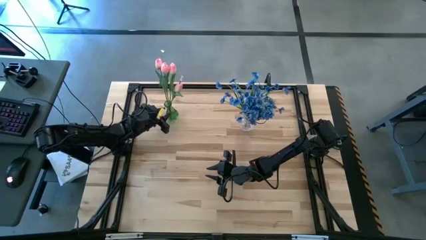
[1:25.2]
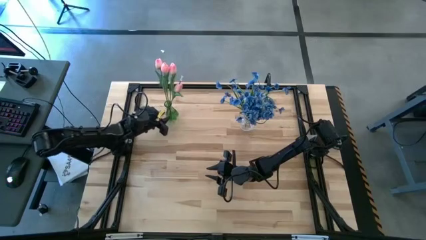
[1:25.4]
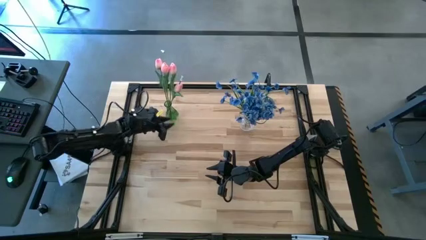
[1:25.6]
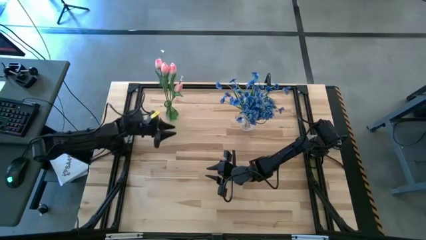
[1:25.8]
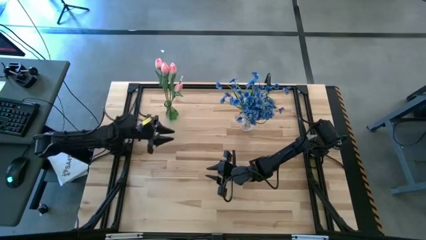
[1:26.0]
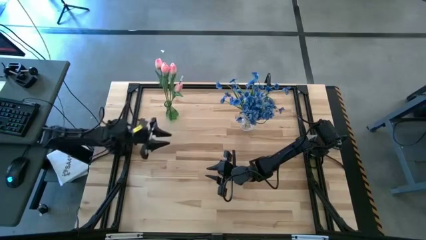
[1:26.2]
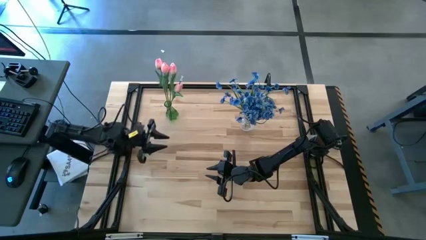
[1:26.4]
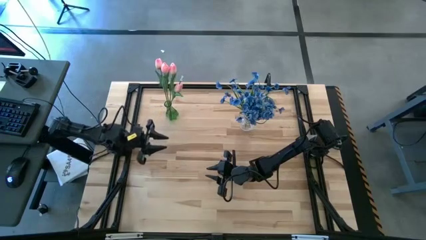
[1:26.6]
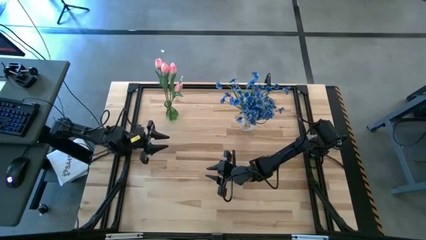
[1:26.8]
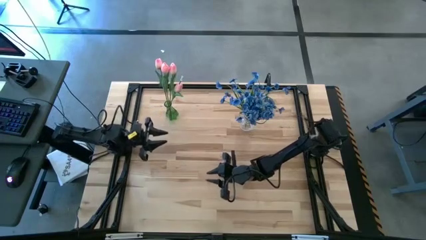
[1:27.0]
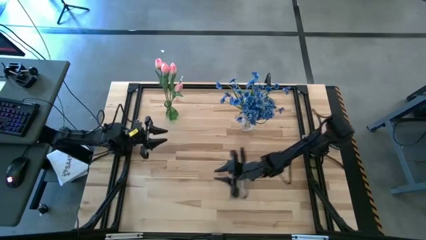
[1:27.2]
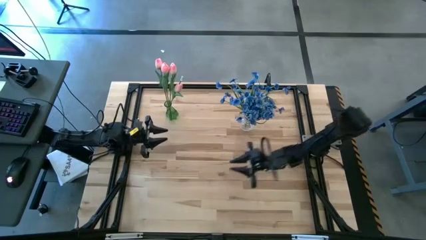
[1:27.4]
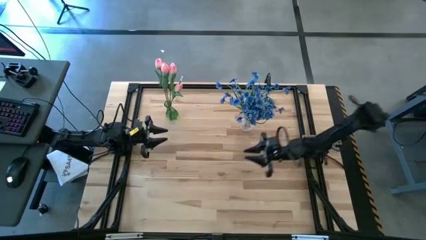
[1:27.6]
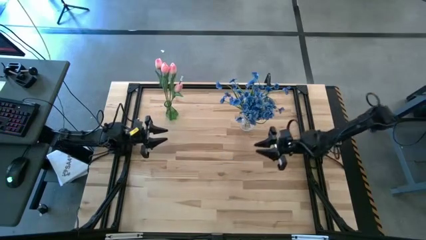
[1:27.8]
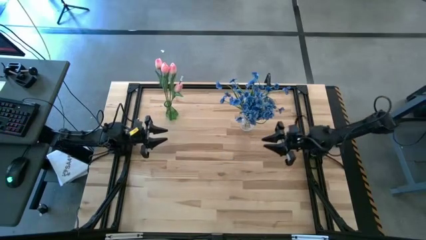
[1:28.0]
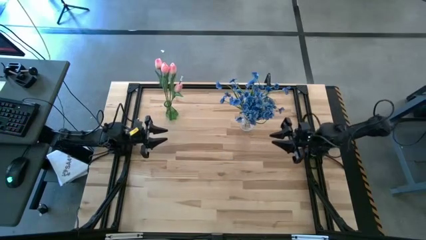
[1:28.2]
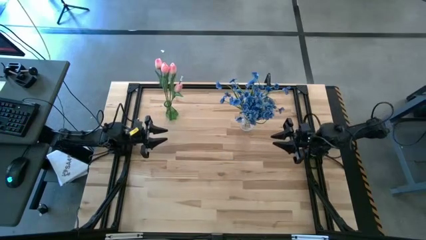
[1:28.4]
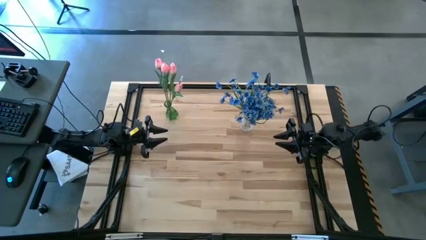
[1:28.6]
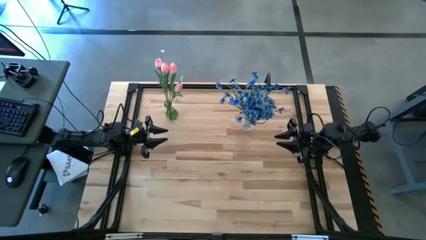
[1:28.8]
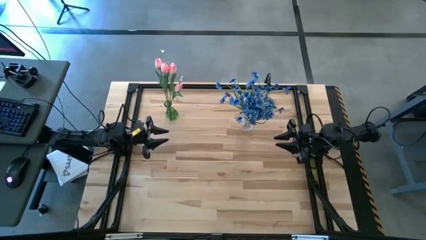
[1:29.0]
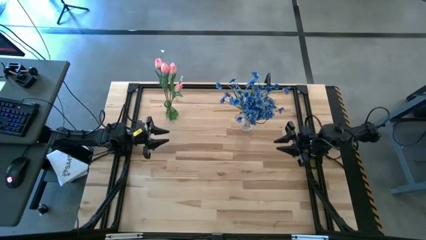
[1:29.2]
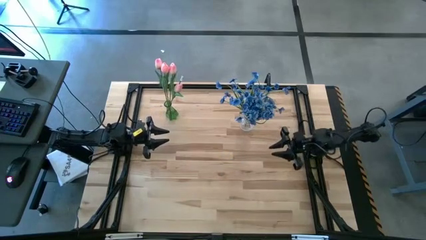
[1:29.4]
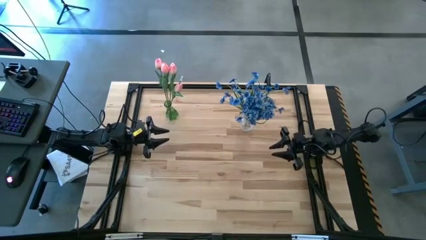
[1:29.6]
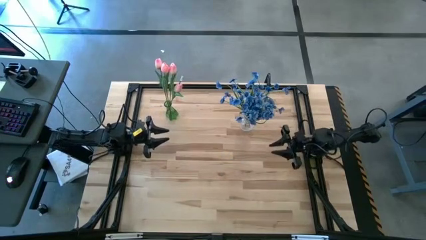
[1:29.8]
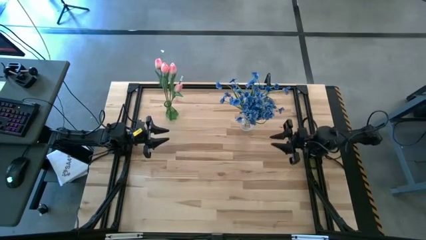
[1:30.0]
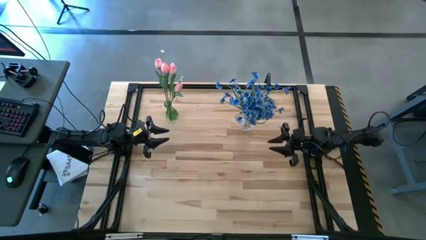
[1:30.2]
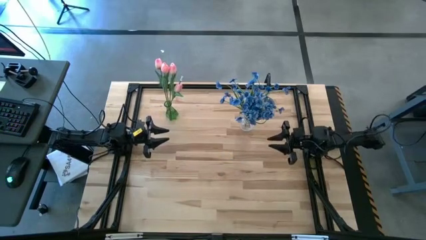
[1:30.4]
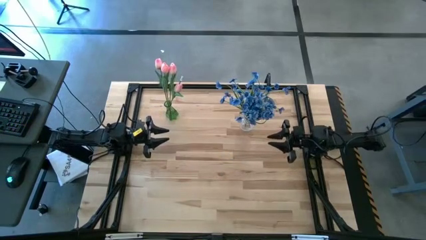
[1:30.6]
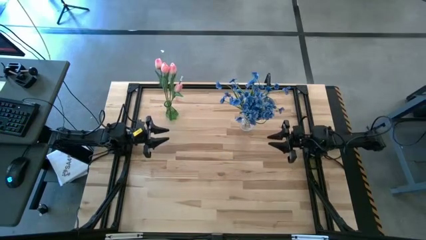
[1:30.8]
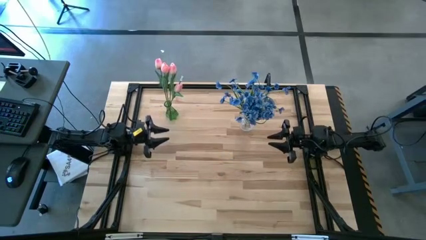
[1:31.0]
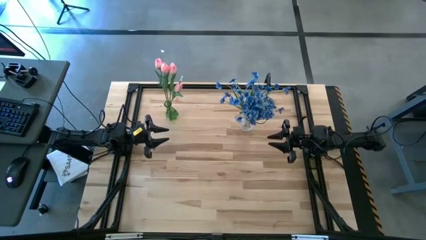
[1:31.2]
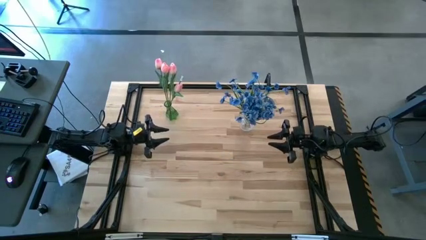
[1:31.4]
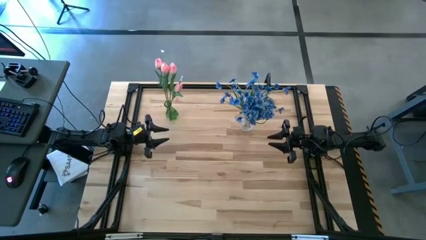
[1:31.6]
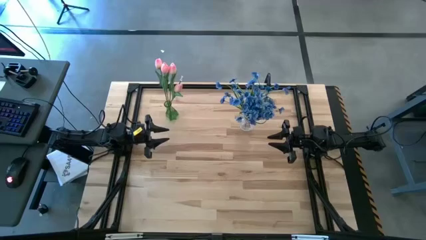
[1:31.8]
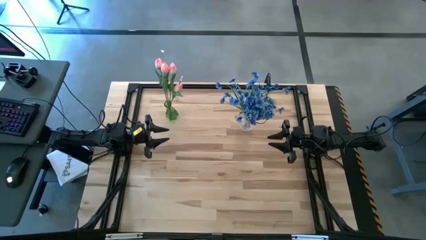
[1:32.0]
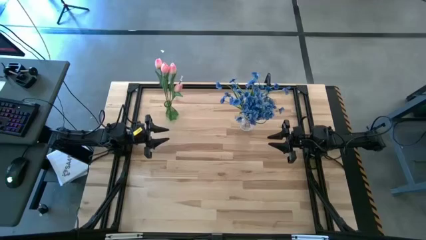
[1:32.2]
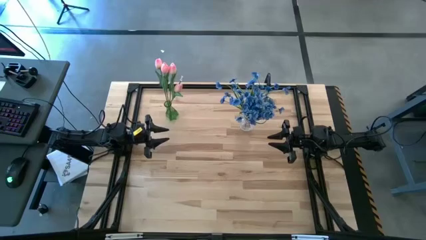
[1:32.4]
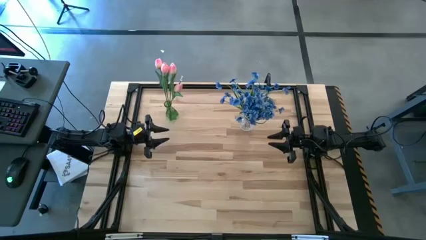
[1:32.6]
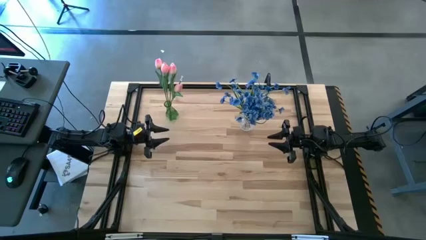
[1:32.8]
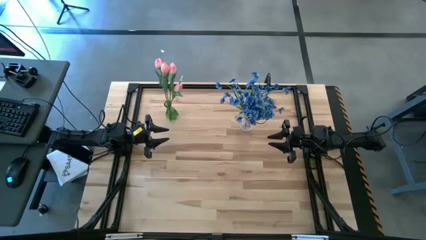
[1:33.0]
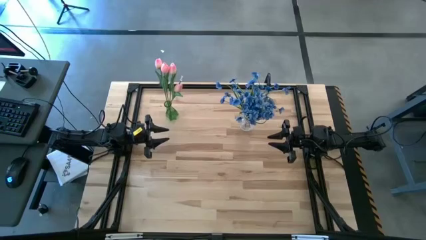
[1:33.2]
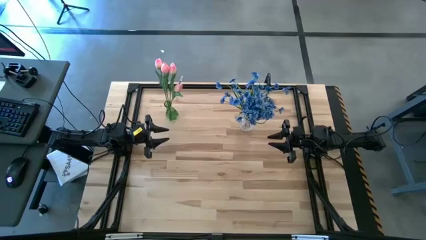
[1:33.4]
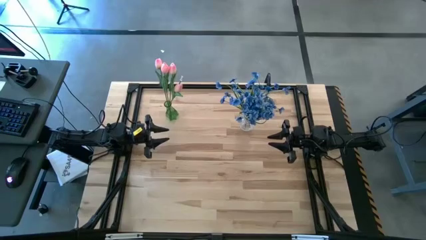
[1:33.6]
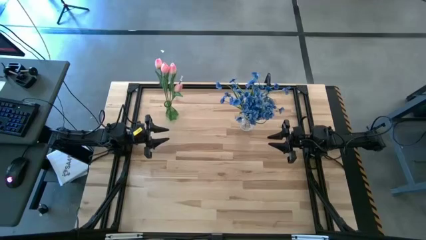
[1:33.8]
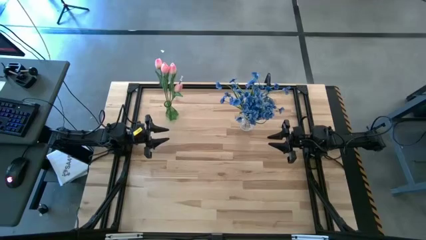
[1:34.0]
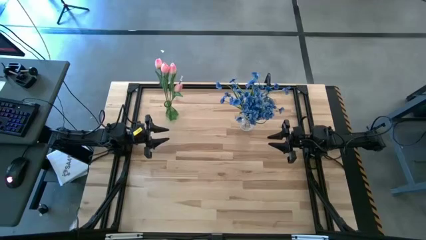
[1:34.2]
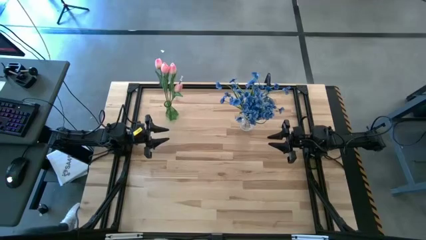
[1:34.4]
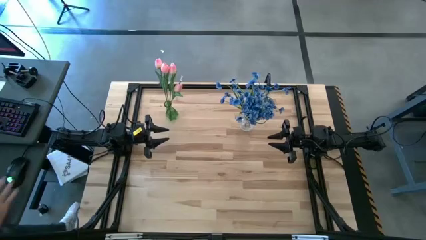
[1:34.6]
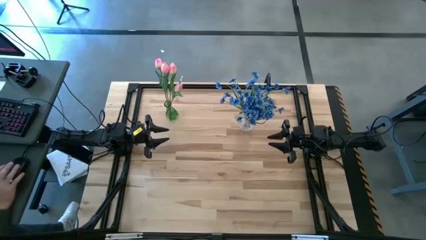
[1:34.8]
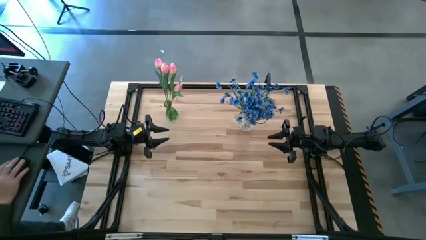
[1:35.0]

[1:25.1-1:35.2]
Task: Sort flowers into vase by color
Return to Home Position

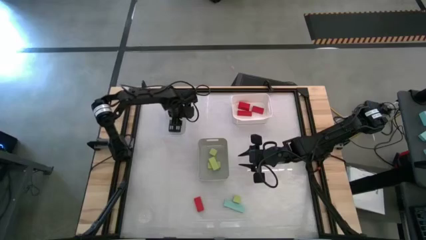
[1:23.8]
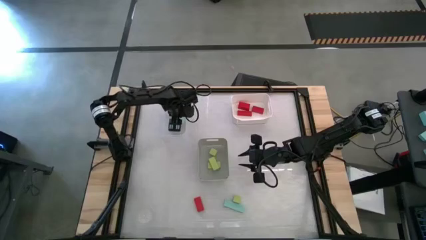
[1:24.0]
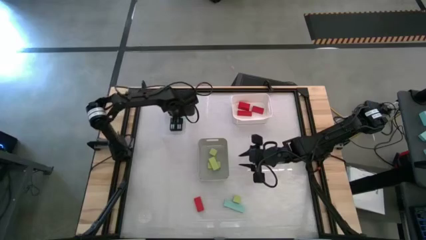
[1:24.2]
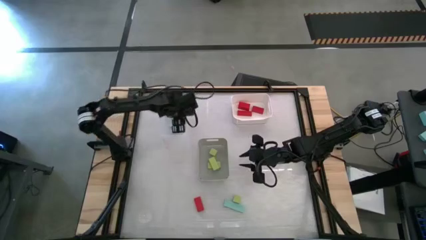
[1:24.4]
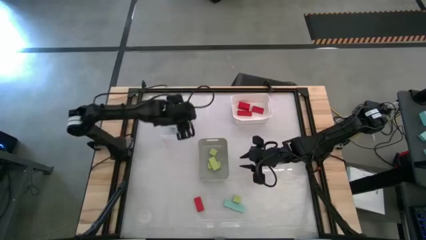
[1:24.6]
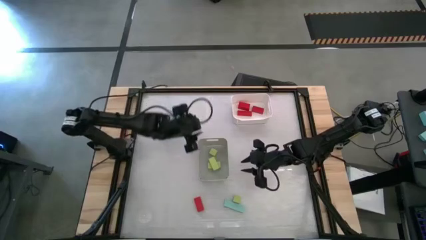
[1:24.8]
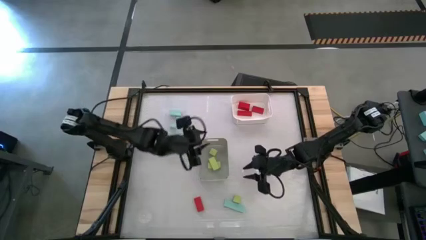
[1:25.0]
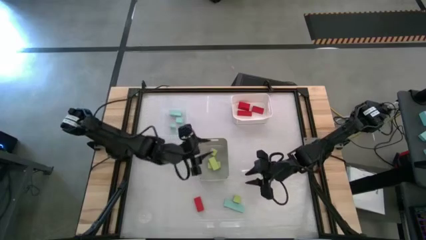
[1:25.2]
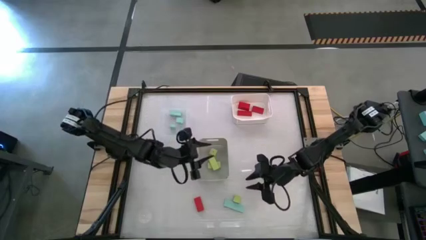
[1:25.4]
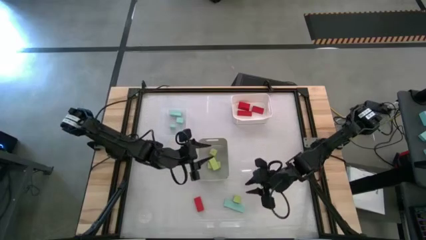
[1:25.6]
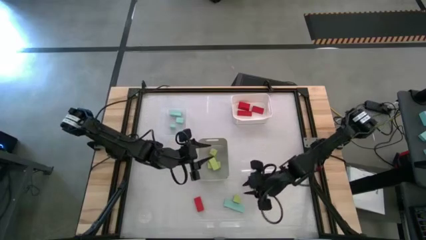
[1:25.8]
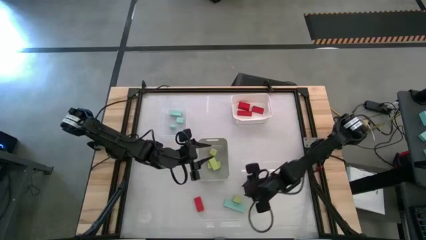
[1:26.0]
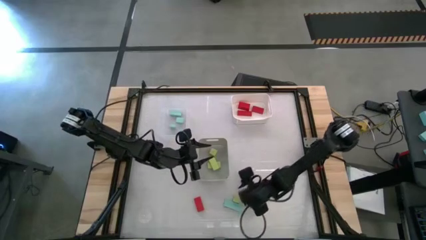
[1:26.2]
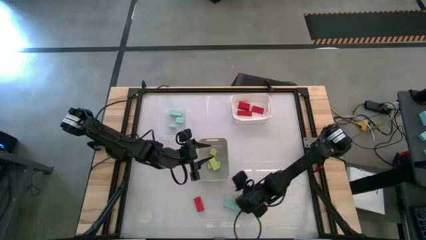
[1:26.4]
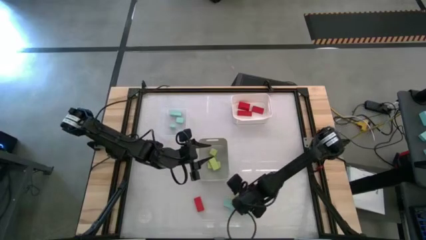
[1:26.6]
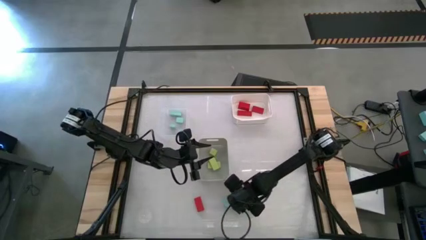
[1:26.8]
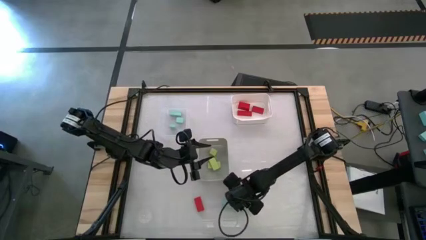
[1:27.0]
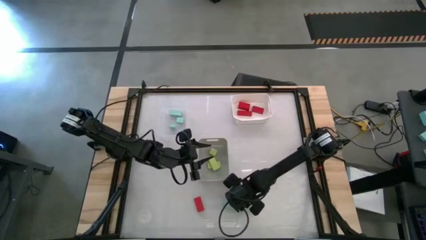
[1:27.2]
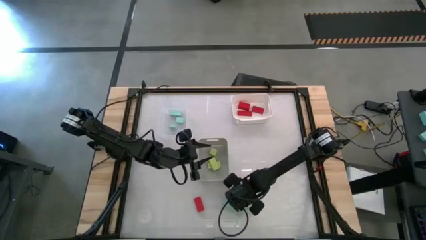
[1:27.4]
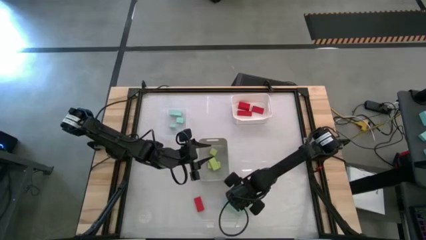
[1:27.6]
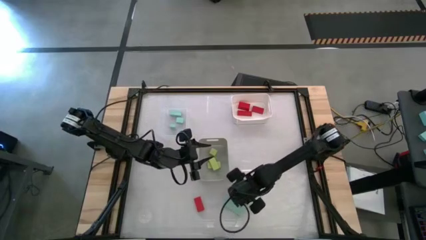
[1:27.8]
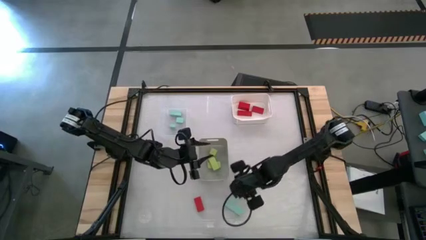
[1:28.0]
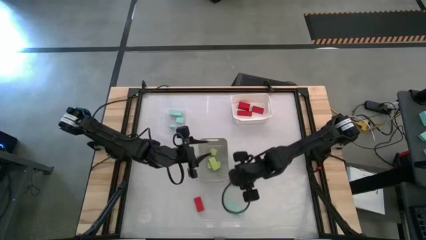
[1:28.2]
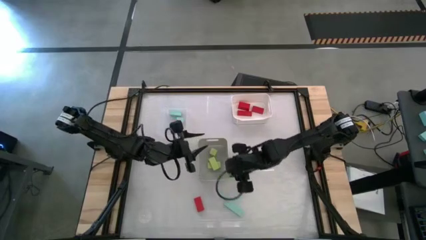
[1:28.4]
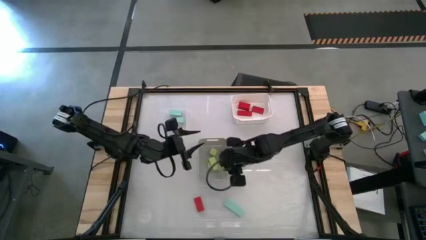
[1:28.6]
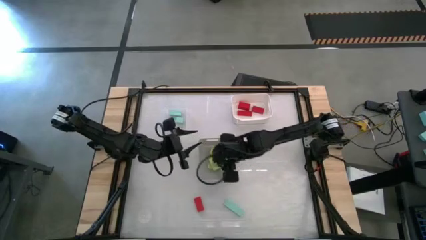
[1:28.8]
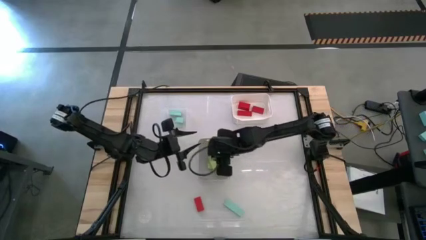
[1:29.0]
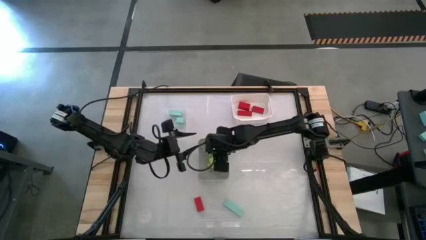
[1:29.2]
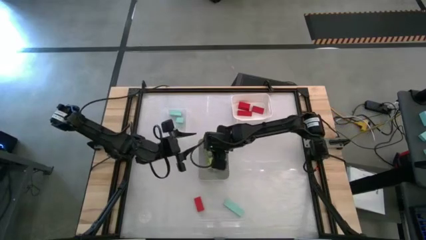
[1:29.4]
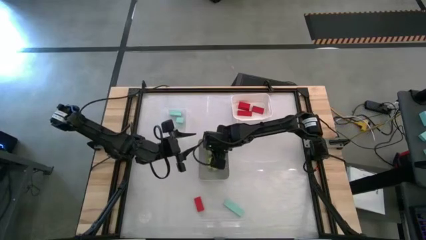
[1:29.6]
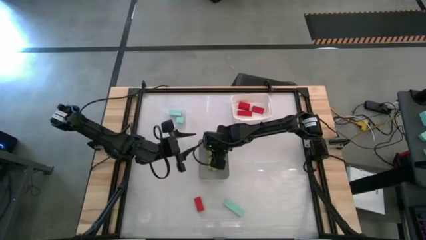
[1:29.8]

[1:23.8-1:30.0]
Task: Sort & place blocks by color
Put the green block into the gray bin
